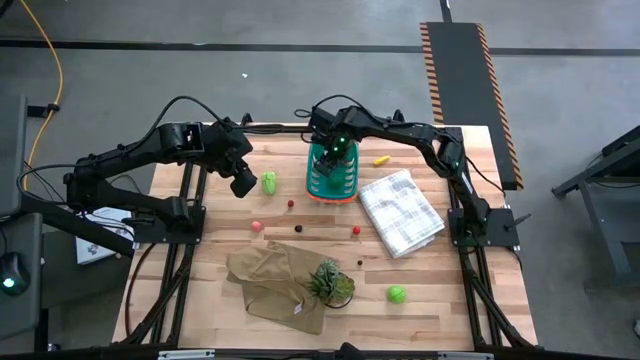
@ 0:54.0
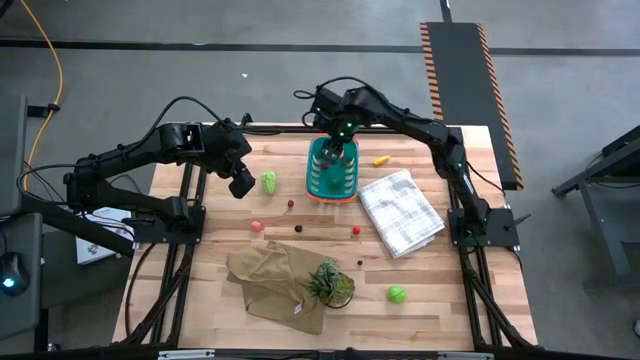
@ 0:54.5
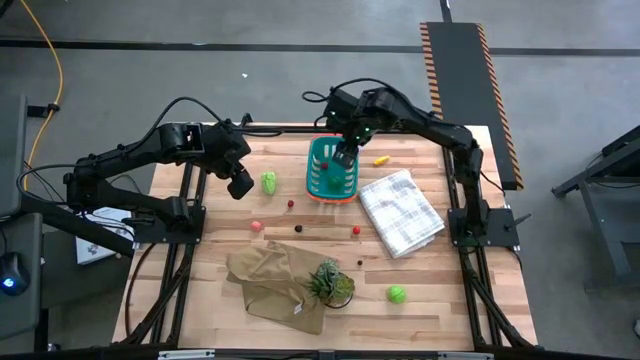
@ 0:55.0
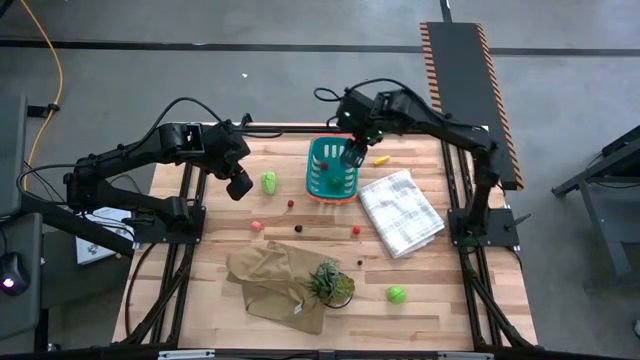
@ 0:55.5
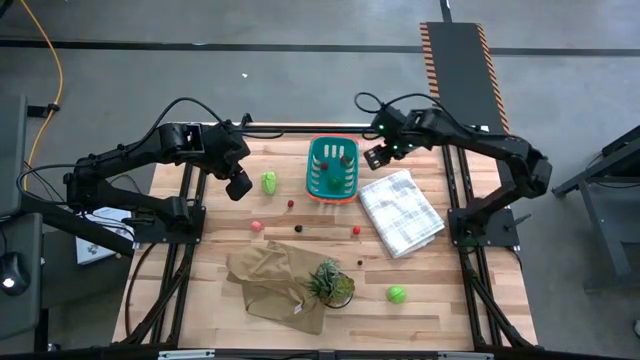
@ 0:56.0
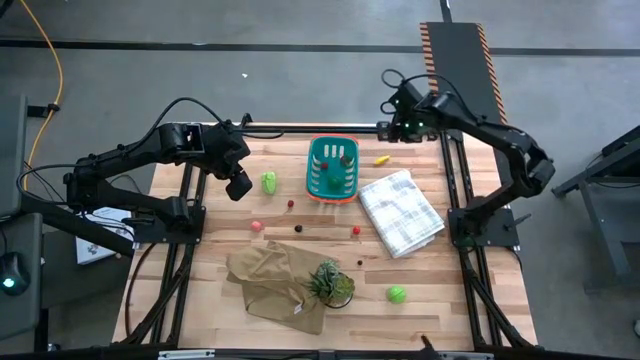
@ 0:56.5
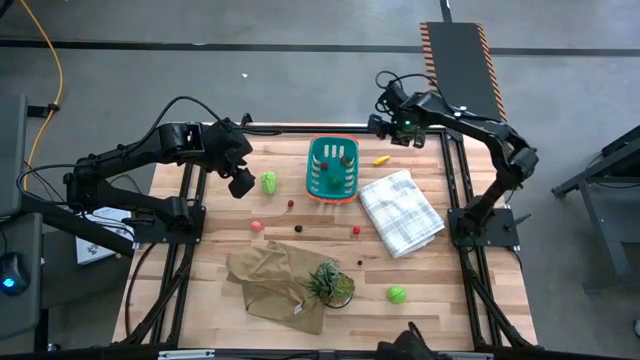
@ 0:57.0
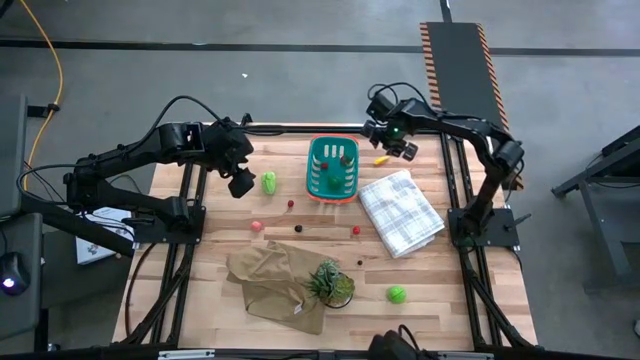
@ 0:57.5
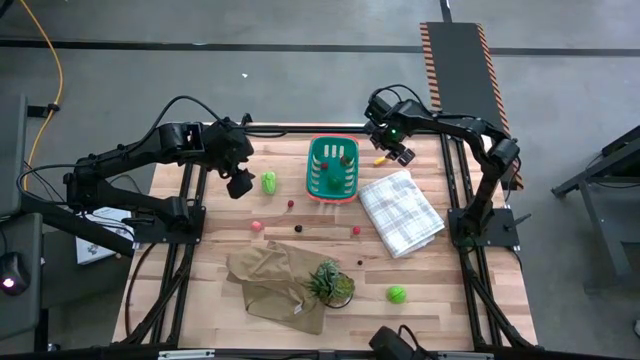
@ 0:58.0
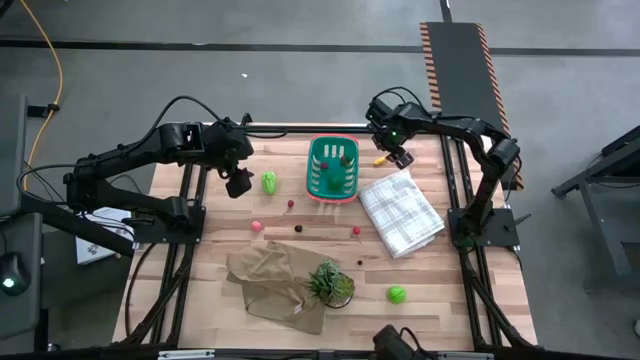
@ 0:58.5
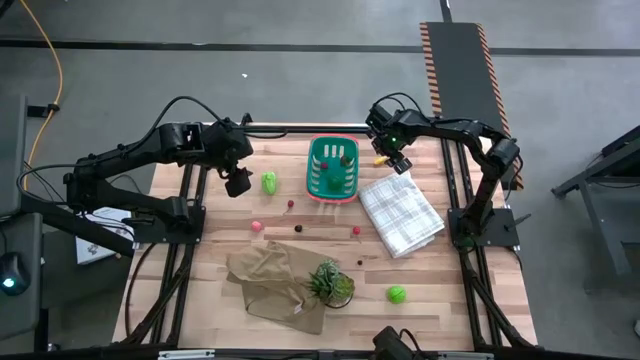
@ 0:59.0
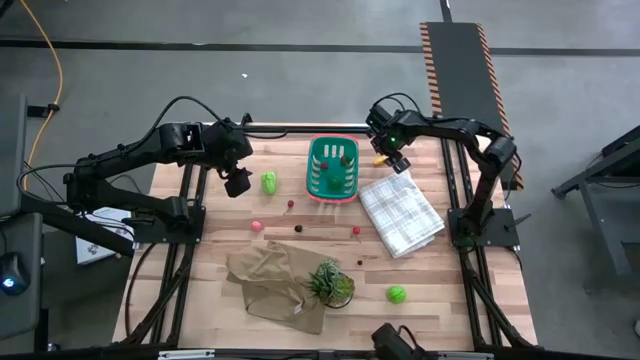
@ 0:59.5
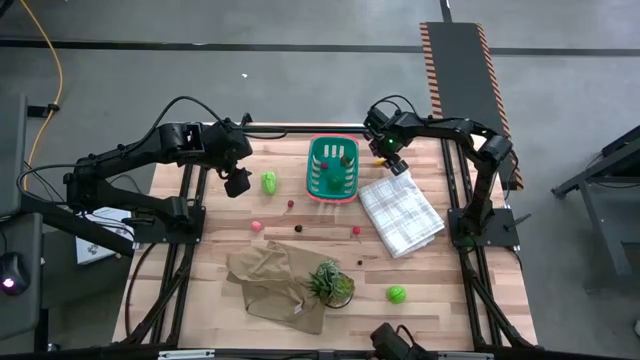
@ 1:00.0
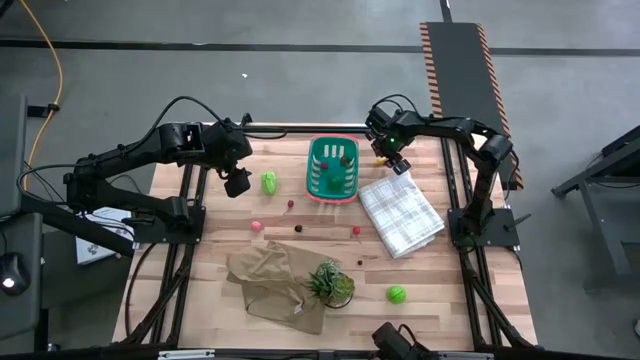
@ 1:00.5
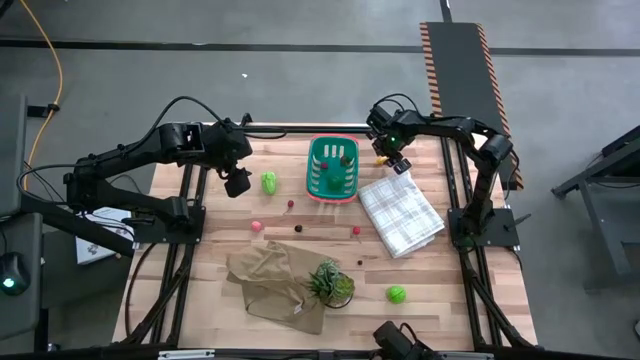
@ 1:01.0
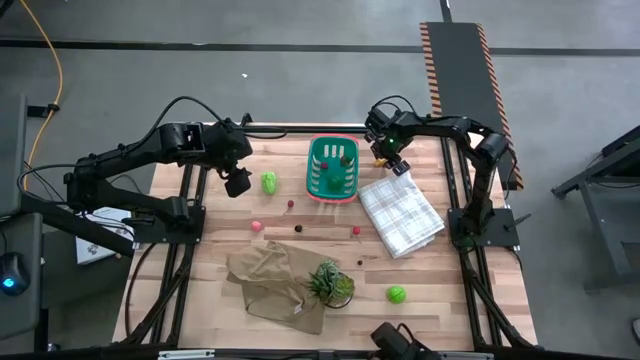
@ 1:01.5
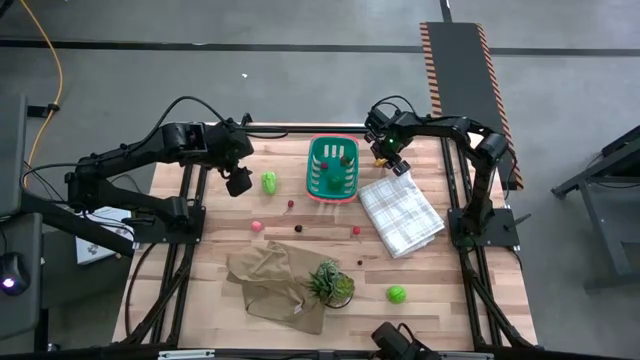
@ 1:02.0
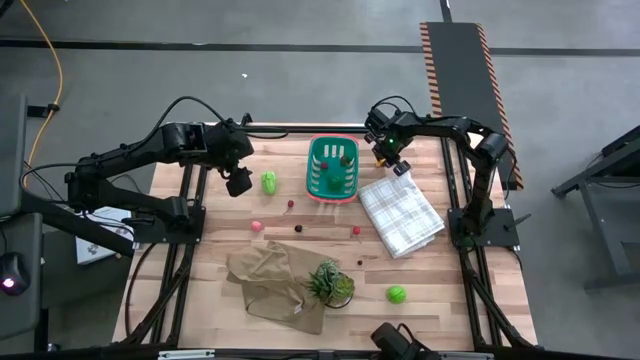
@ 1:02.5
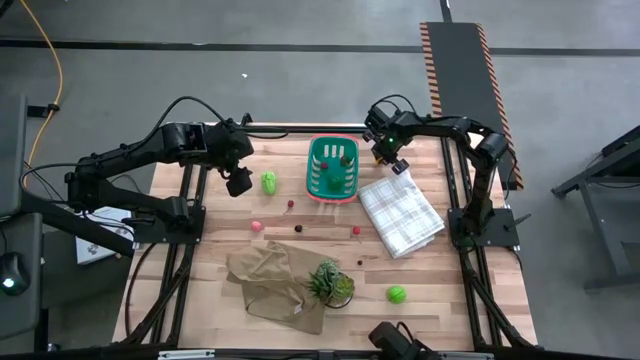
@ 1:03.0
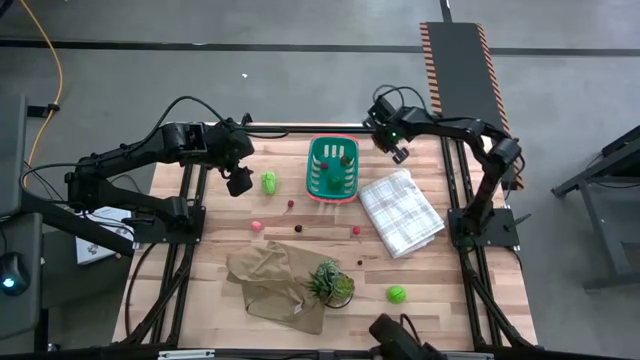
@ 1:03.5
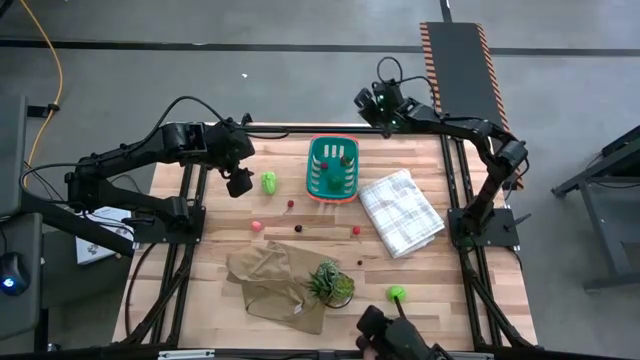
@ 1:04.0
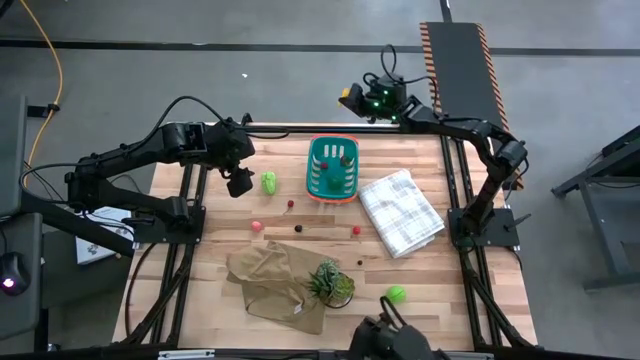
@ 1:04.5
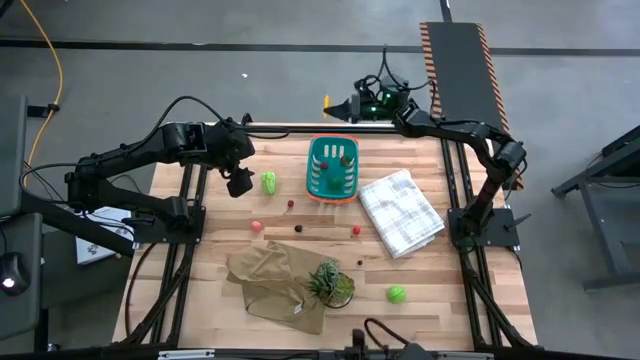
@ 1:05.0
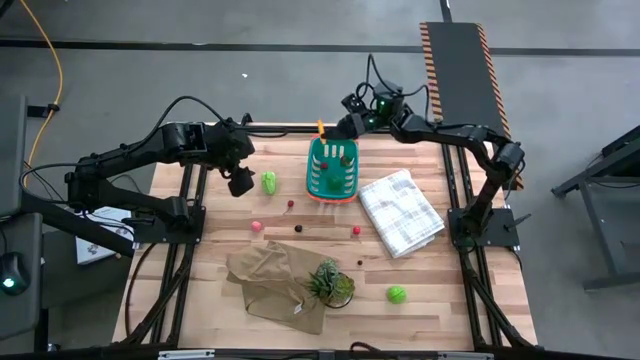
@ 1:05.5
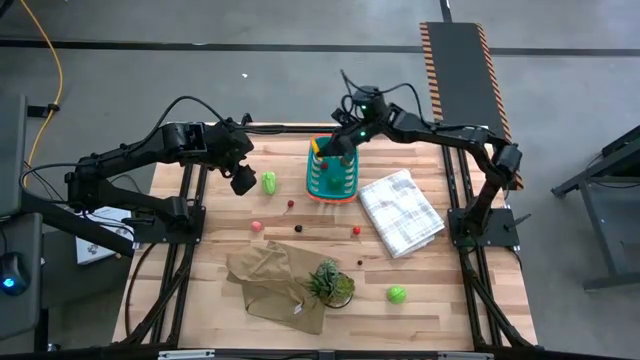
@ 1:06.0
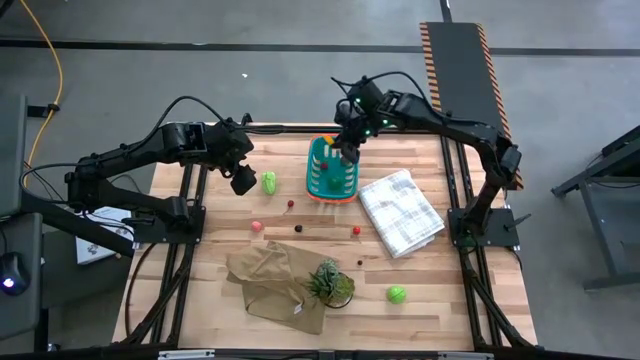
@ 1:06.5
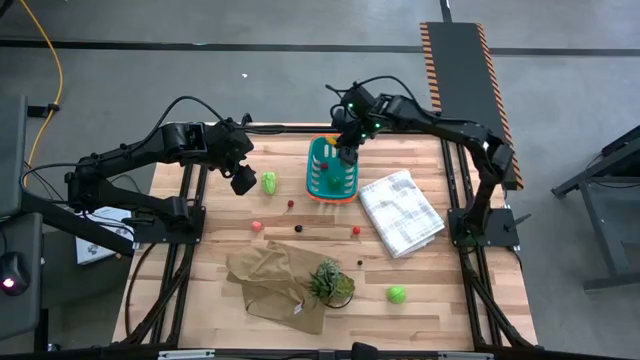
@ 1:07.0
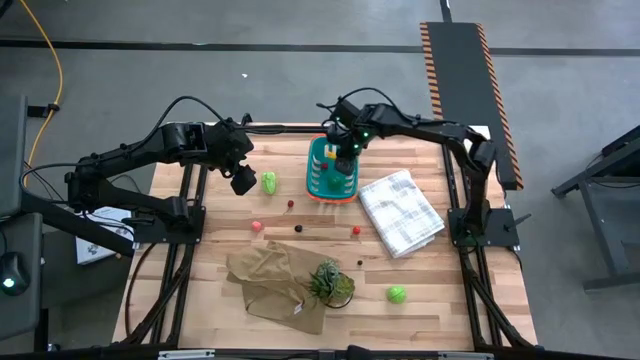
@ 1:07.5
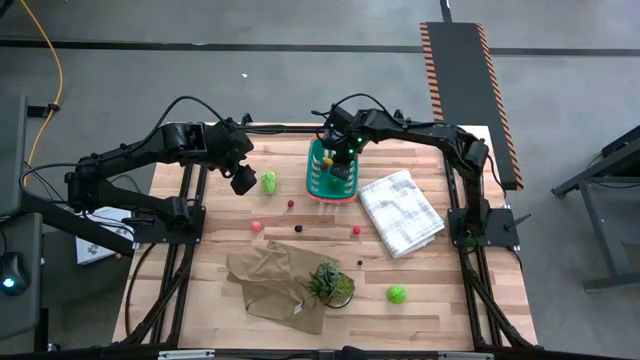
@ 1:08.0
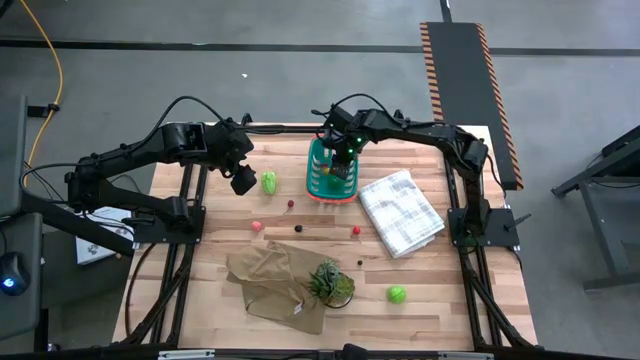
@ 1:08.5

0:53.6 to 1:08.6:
Task: Pick and placing Produce into tupperware
Put the yellow corn into the green basket

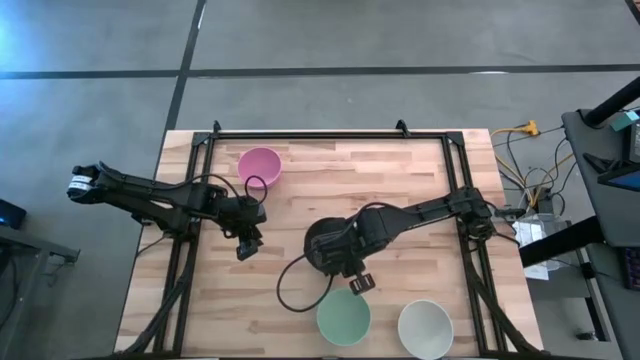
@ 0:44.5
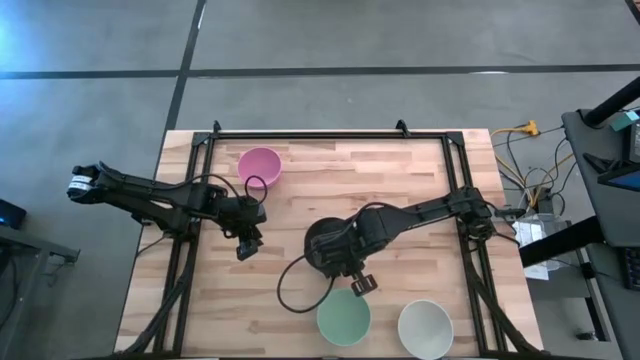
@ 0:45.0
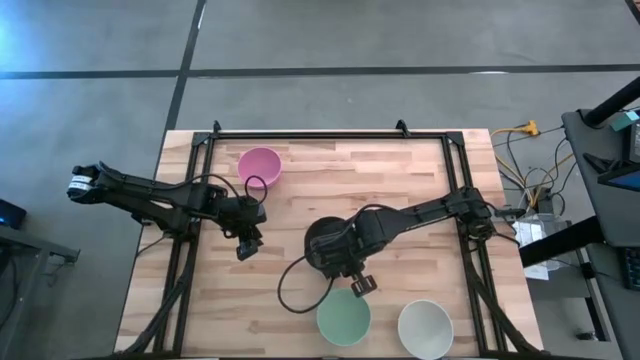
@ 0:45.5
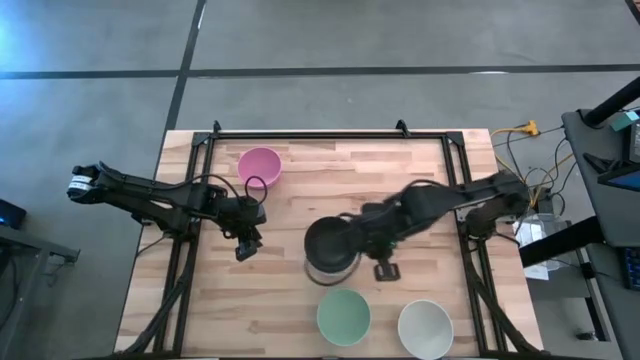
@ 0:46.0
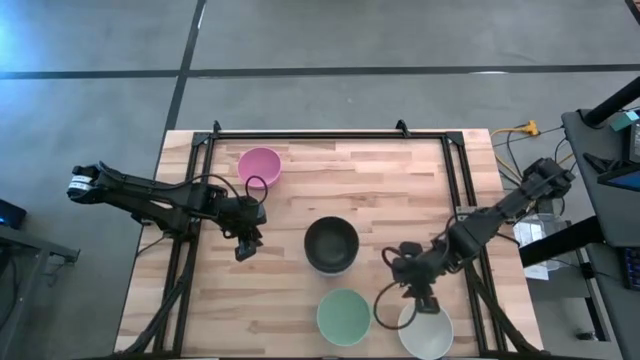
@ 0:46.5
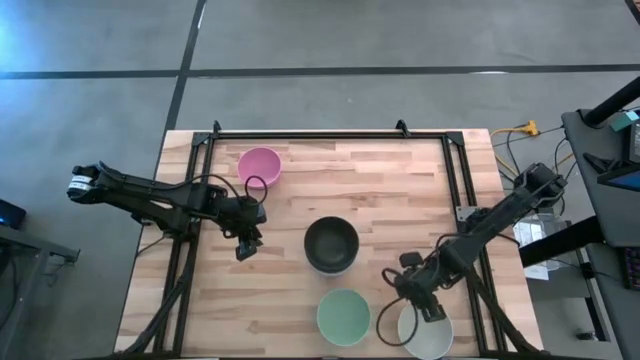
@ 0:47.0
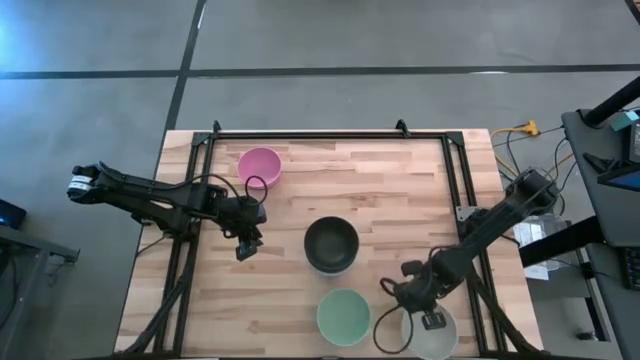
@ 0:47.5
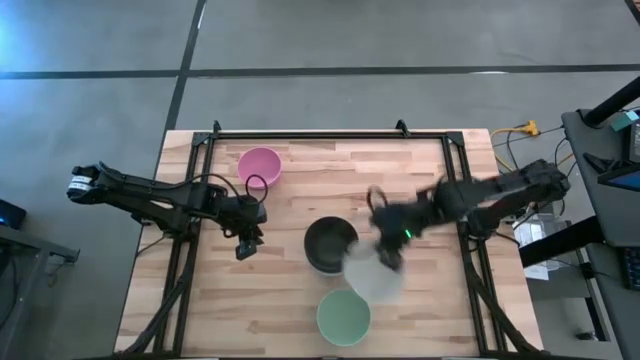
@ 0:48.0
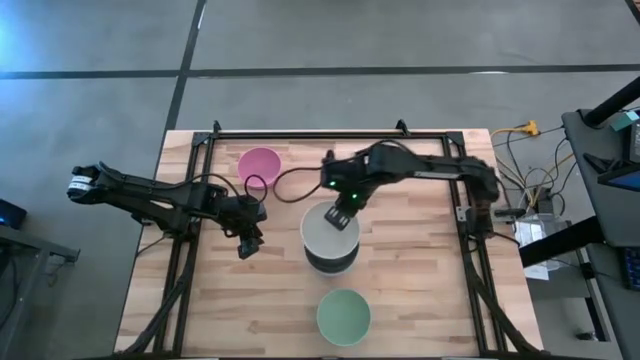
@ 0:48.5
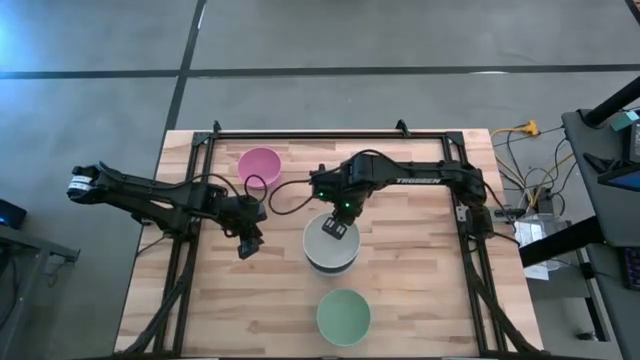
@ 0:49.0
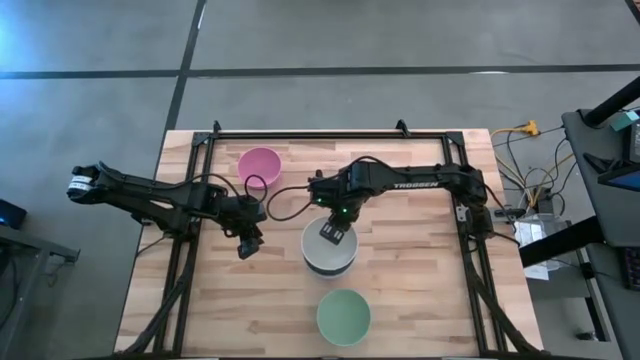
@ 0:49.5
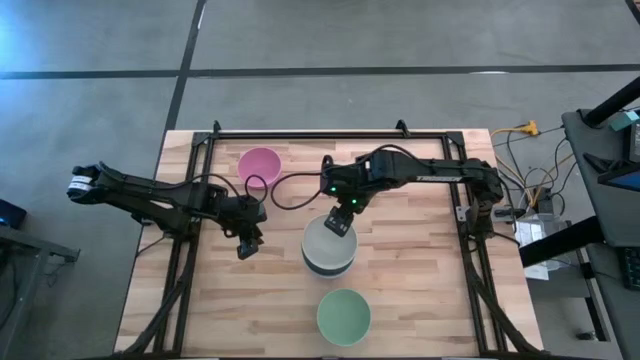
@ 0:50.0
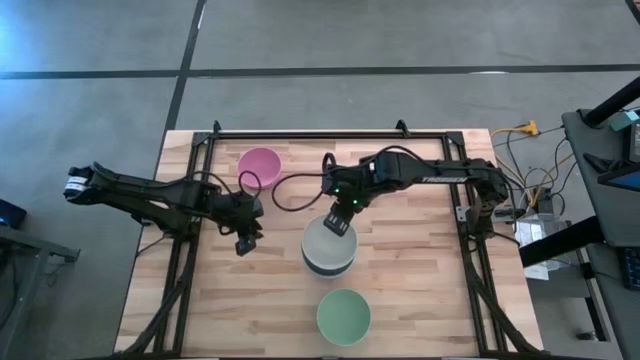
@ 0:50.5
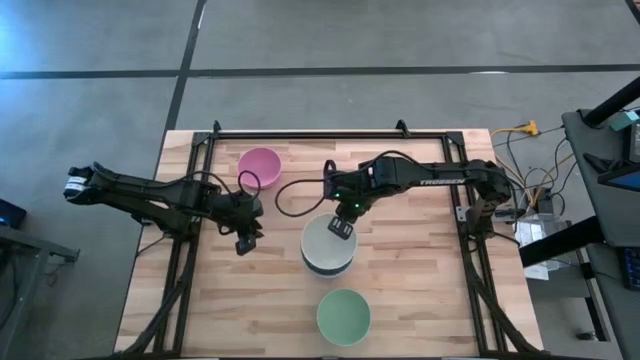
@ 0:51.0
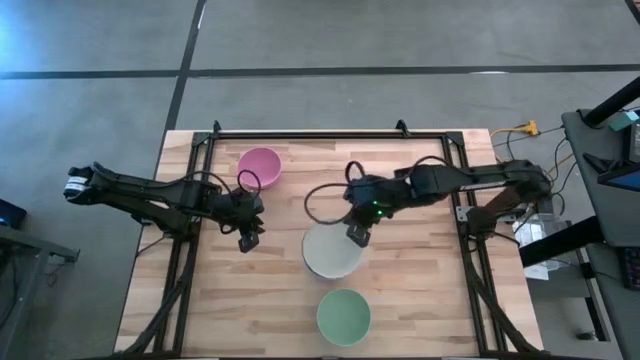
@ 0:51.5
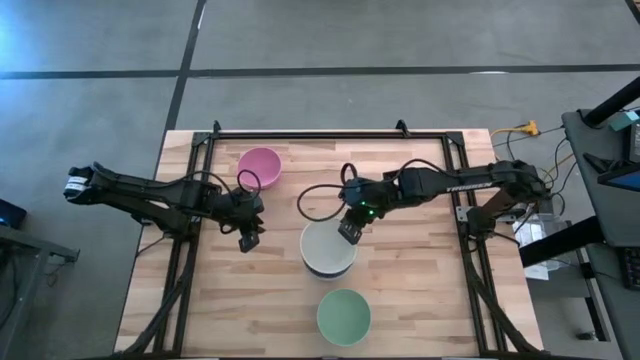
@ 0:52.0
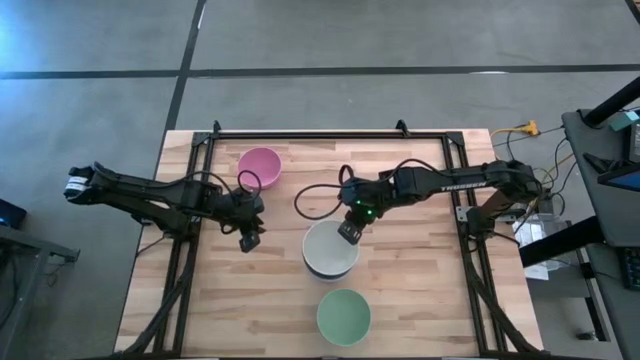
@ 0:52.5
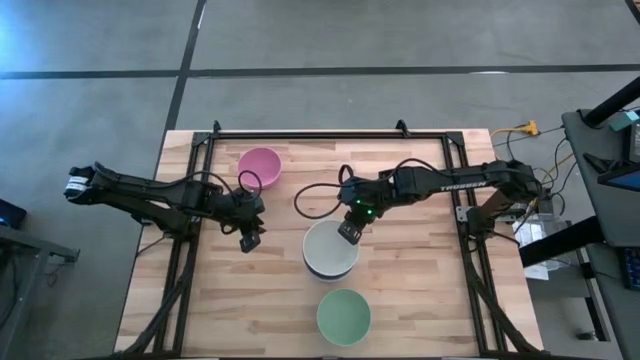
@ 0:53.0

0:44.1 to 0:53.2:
Task: Nest bowls inside each other
Stack the white bowl on top of the black bowl
